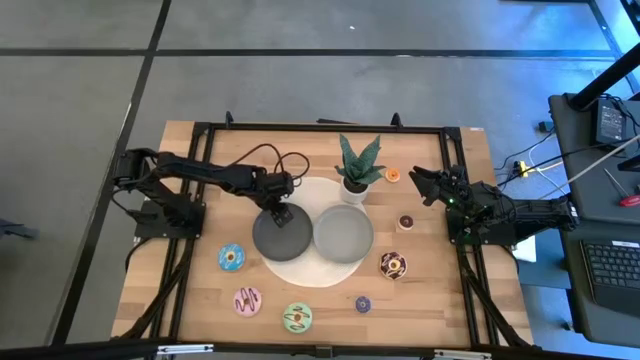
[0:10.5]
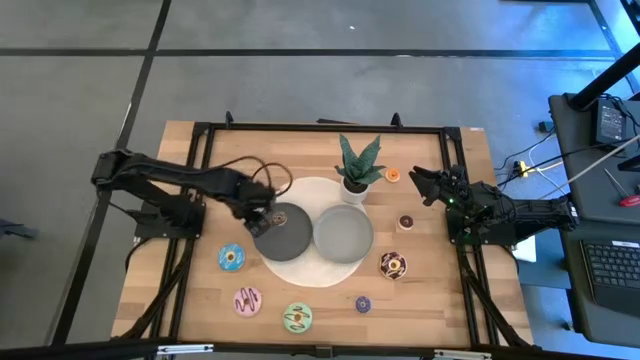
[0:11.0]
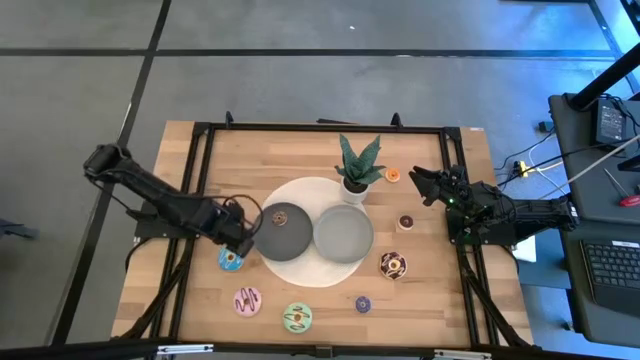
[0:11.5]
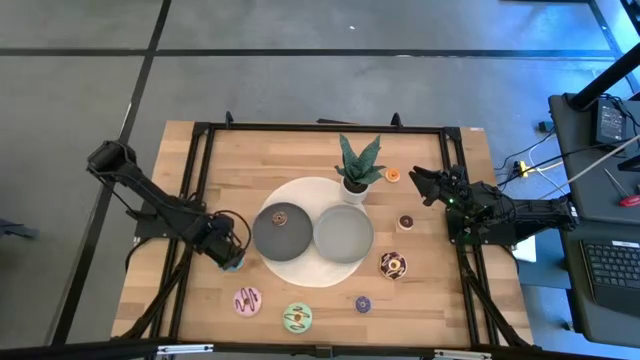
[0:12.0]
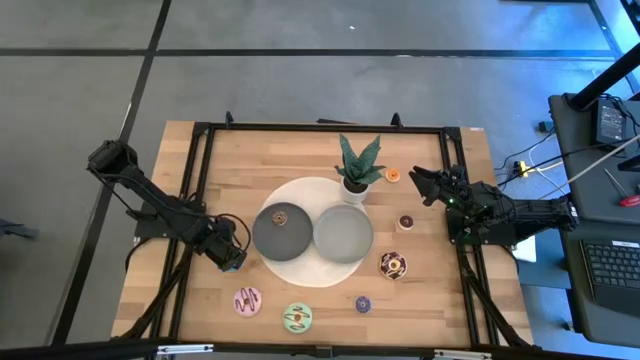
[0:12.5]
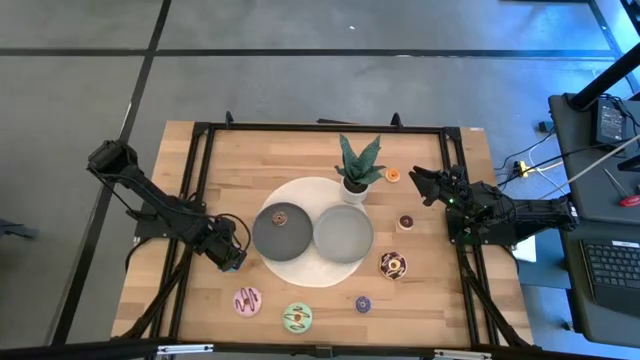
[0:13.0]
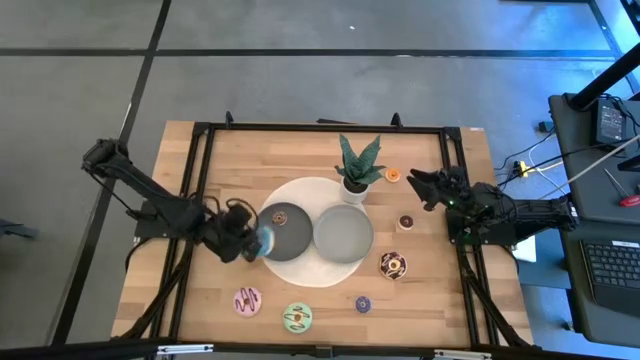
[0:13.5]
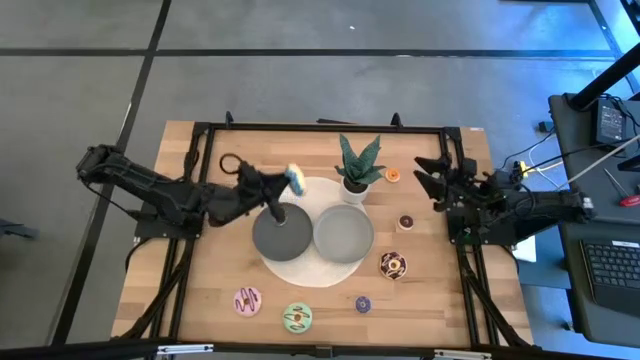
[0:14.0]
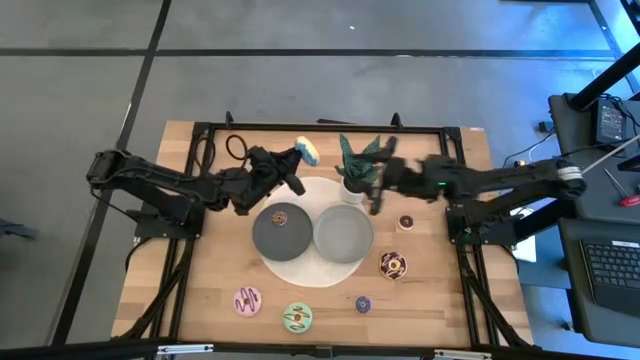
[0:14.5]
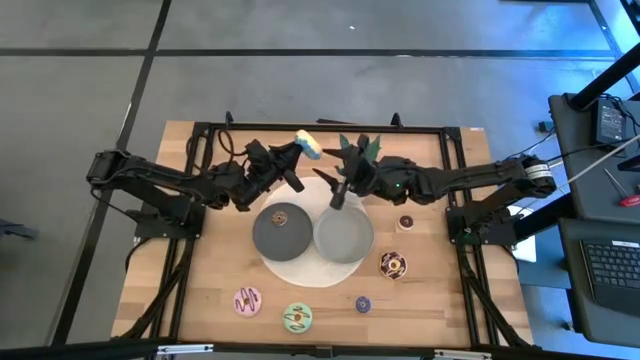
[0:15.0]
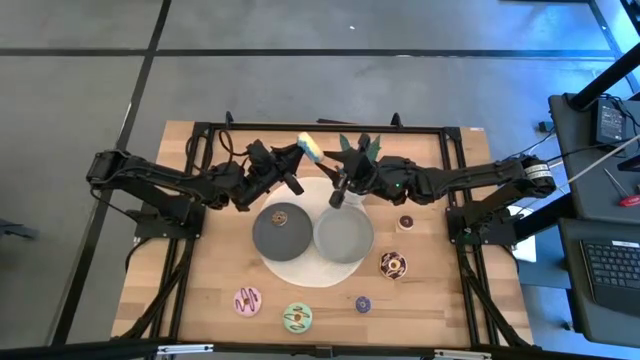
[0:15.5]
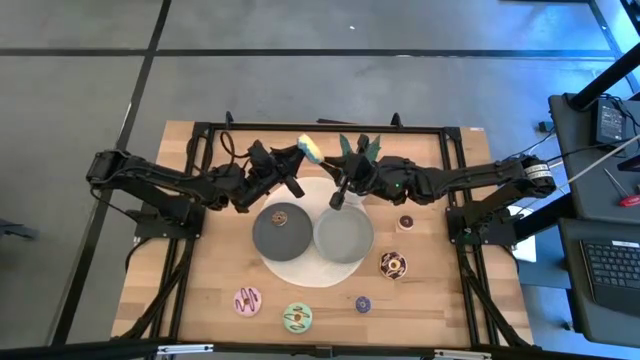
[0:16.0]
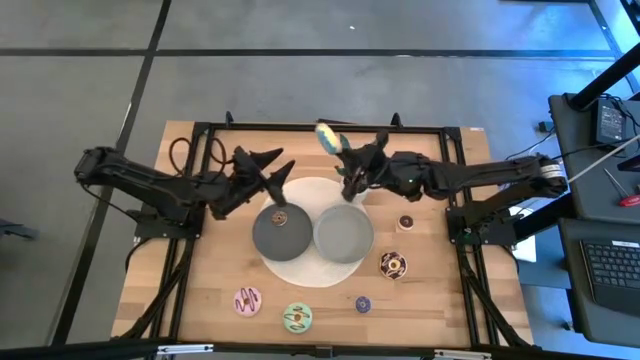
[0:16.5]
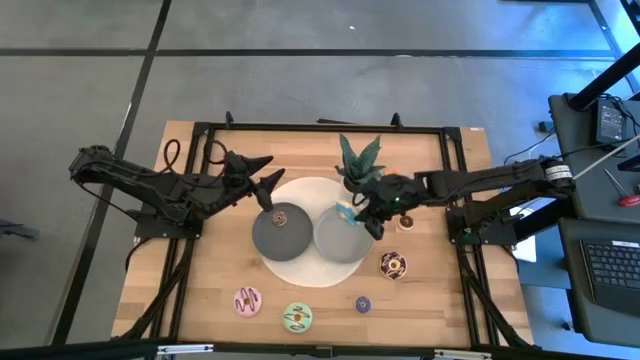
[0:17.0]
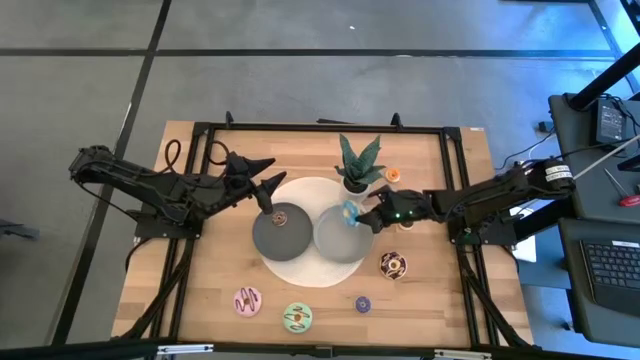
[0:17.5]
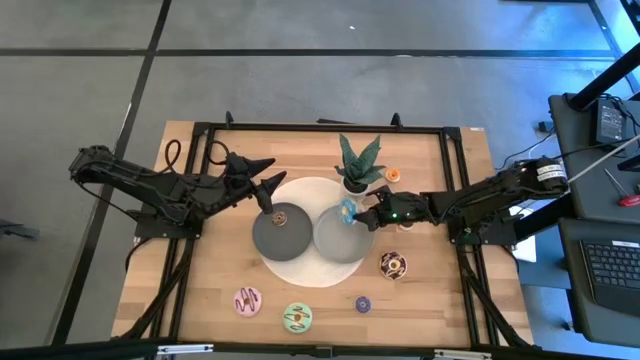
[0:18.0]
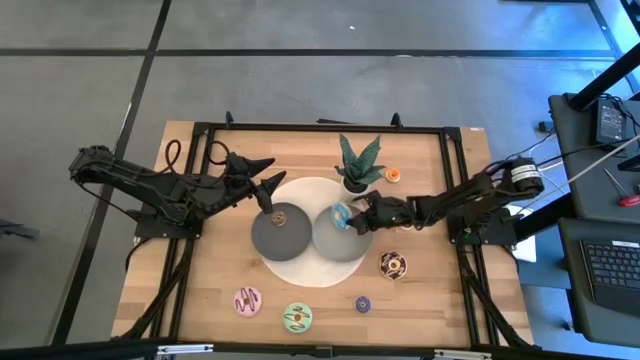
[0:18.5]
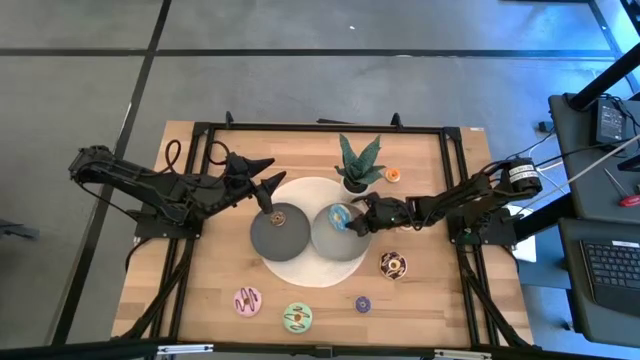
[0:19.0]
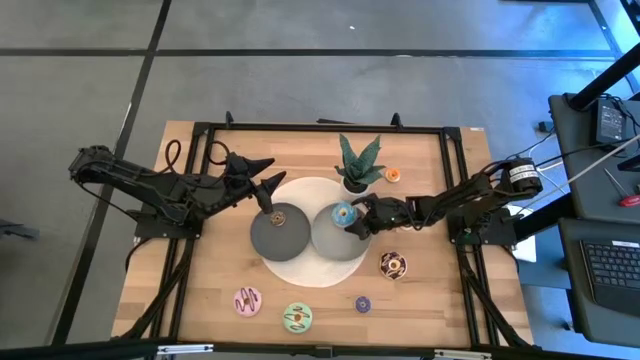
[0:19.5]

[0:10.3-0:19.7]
Task: Pick & Place donuts
Put the big blue doughnut on the light gray plate

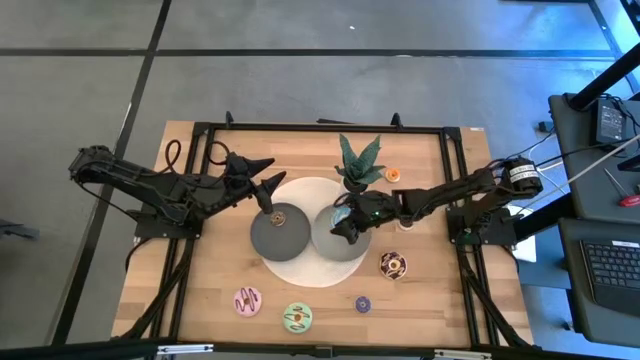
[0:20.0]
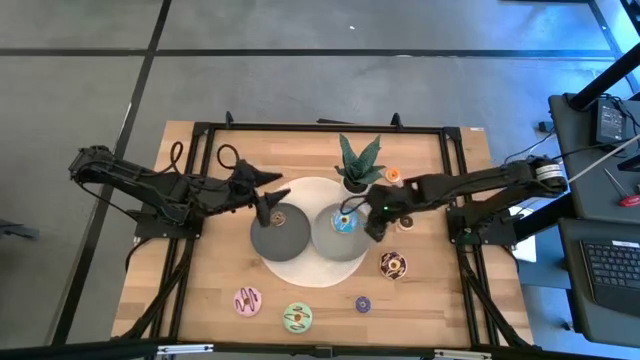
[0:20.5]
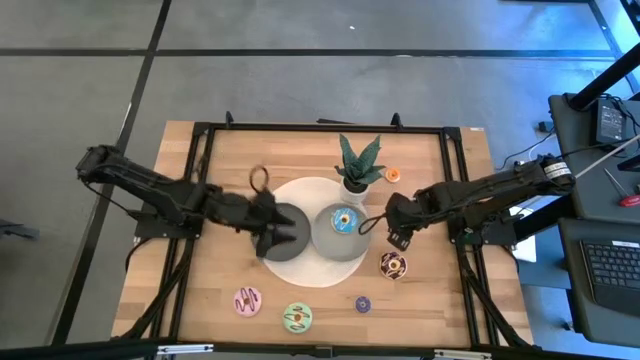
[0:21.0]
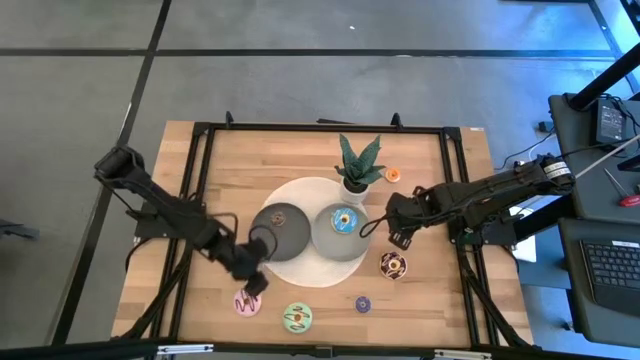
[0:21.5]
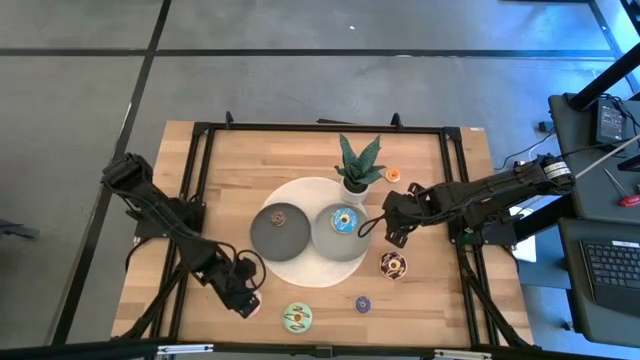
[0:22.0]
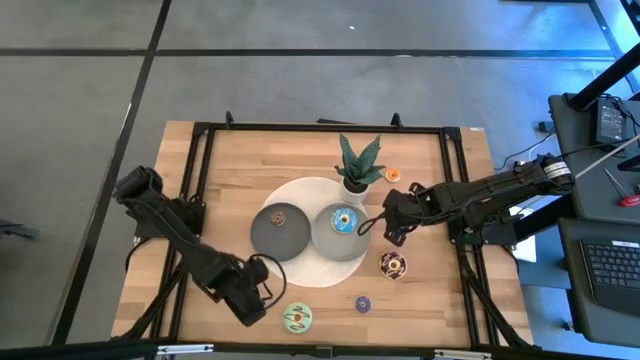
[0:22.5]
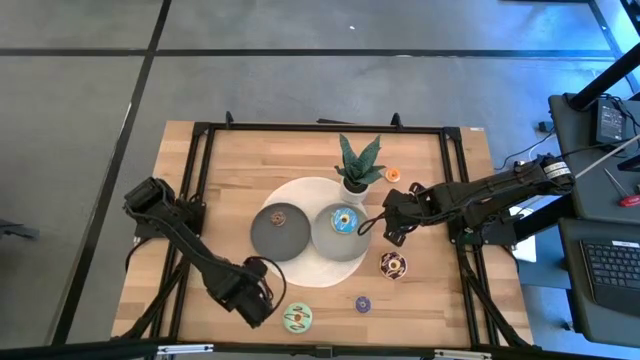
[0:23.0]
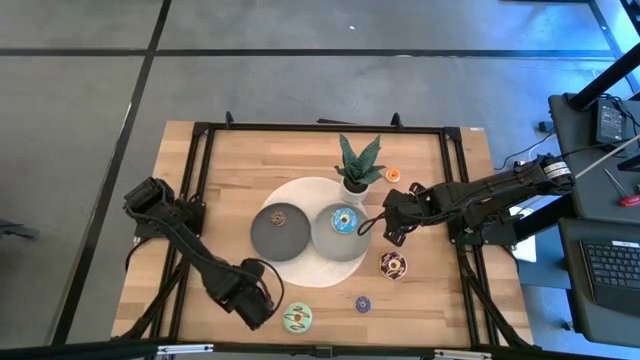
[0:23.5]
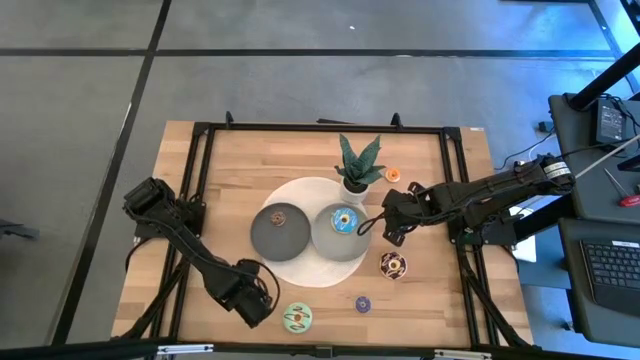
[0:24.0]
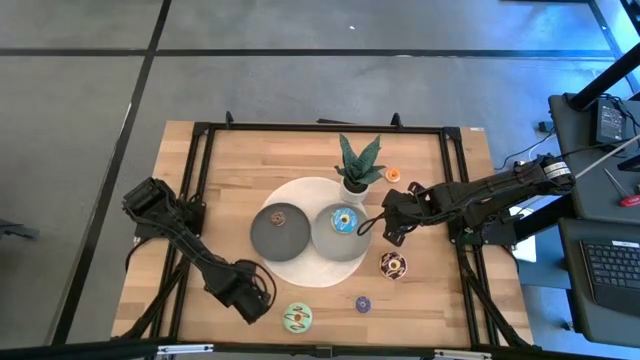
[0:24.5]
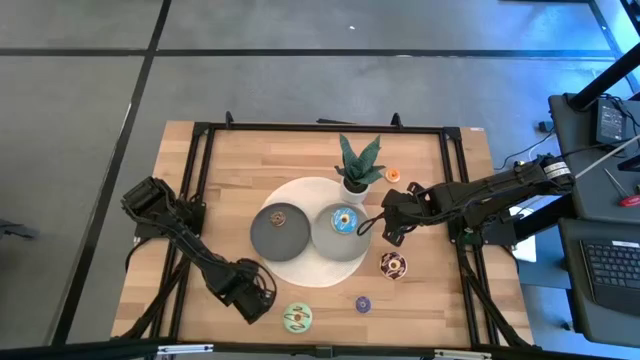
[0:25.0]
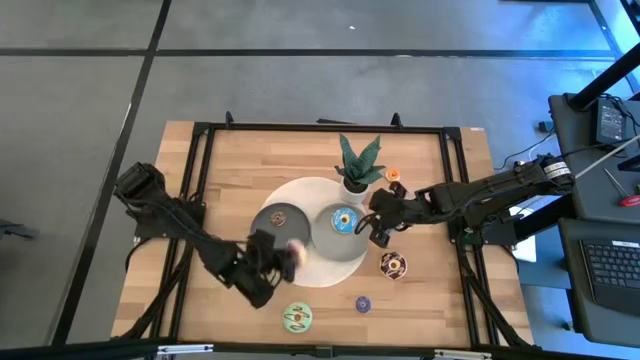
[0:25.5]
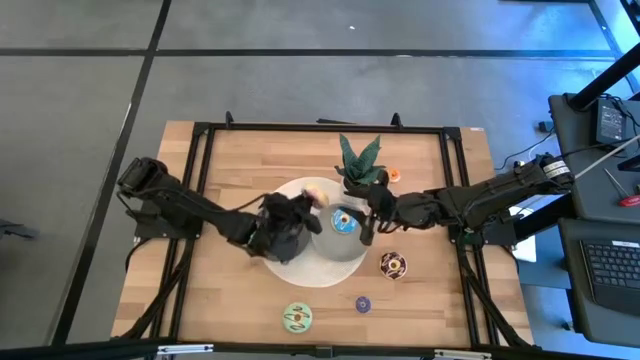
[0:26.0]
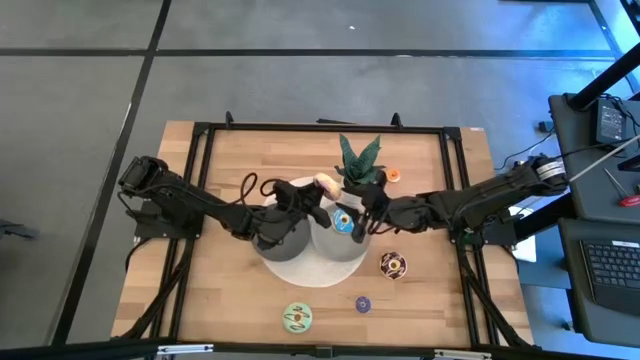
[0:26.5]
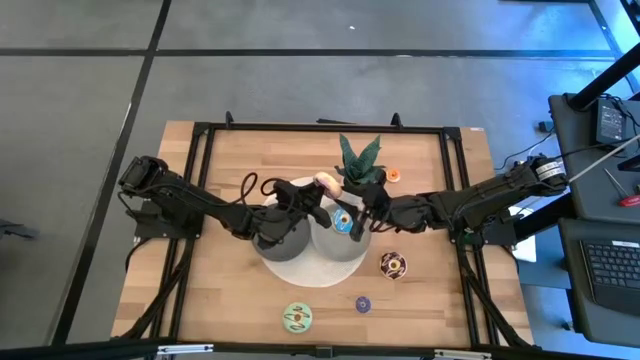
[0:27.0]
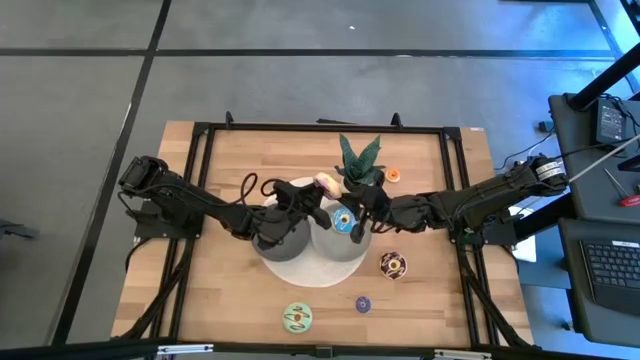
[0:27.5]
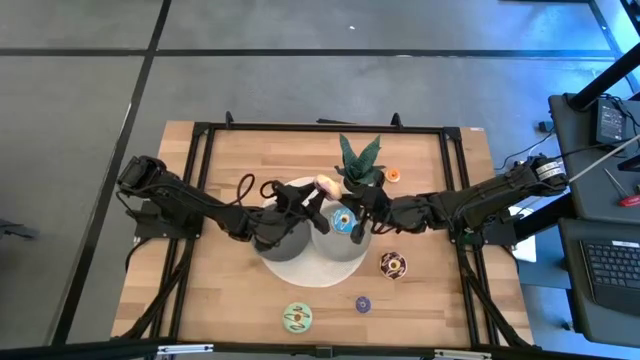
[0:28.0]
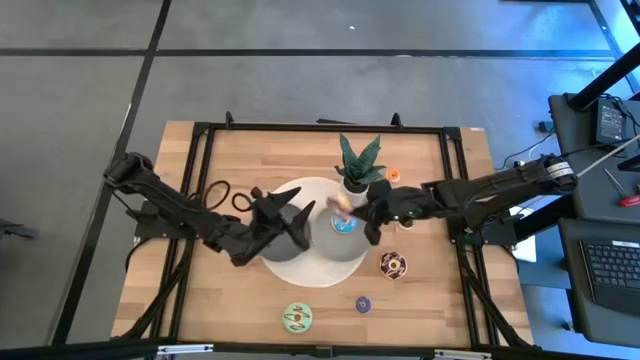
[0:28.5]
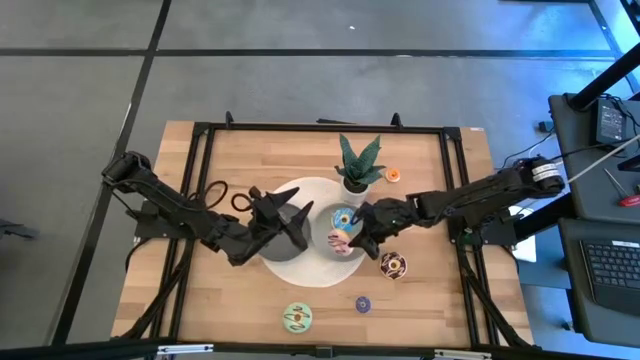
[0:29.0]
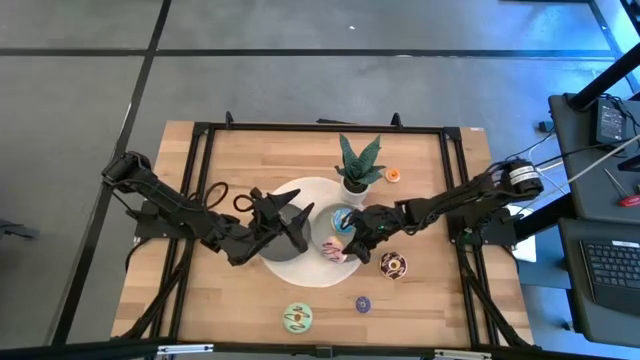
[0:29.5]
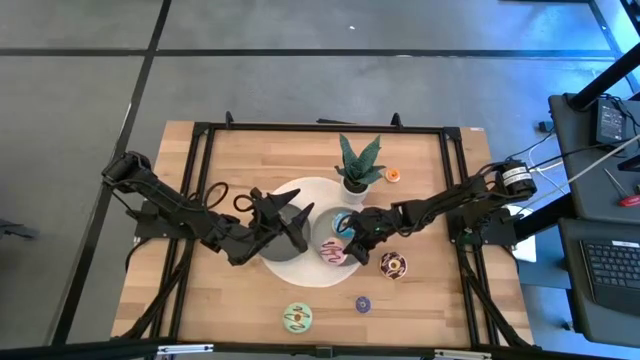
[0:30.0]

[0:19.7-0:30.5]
Put the big light violet doughnut on the light gray plate

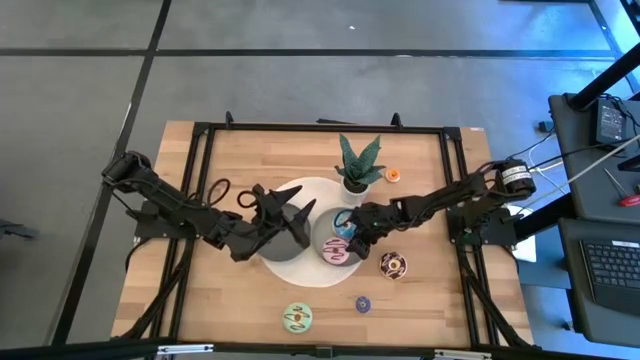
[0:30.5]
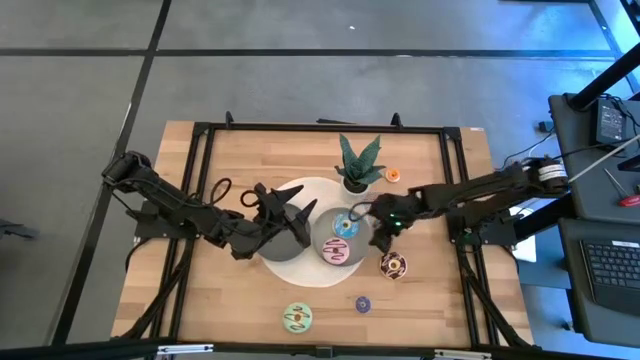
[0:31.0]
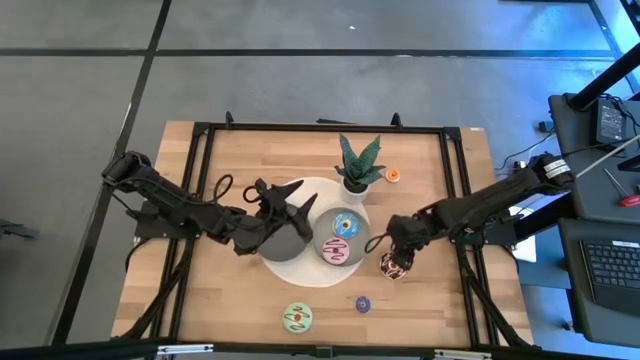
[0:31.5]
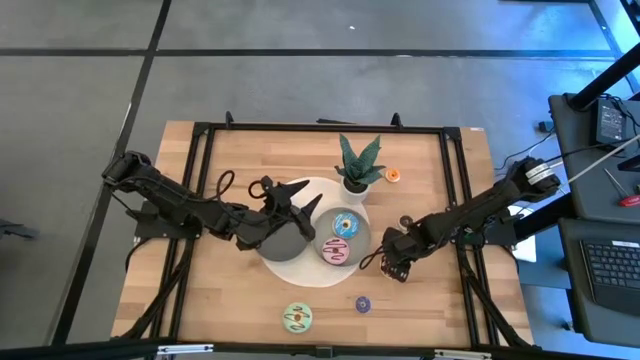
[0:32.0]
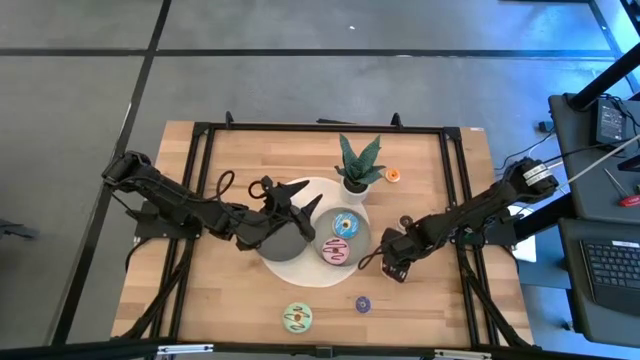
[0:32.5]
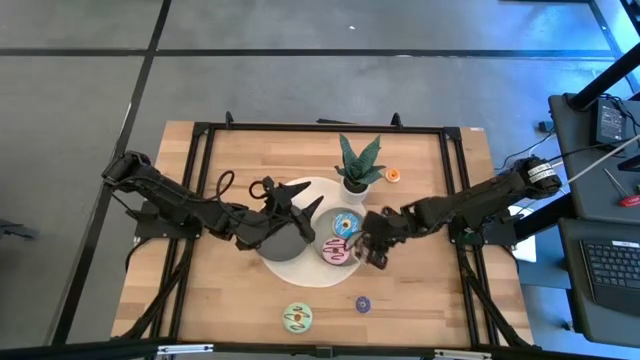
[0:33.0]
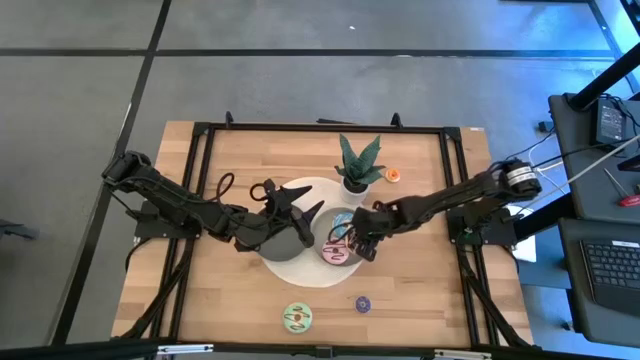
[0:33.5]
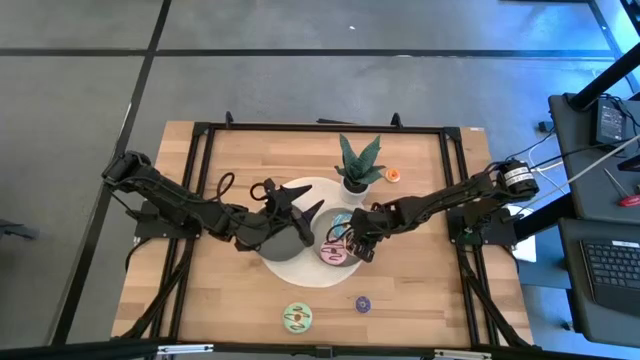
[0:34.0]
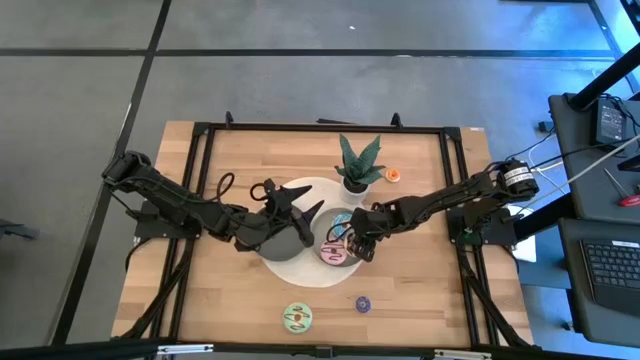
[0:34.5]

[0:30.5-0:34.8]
Put the big black doughnut on the light gray plate
